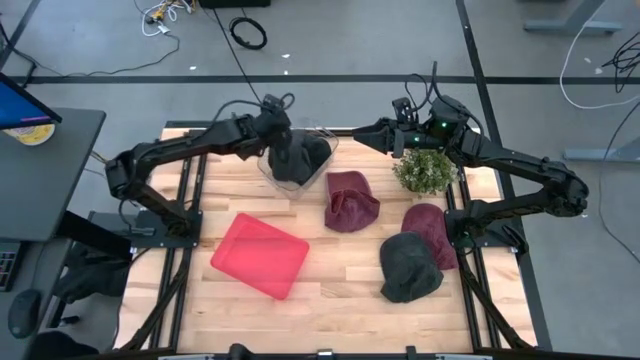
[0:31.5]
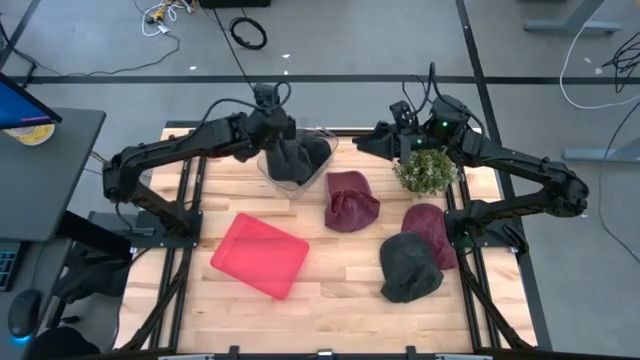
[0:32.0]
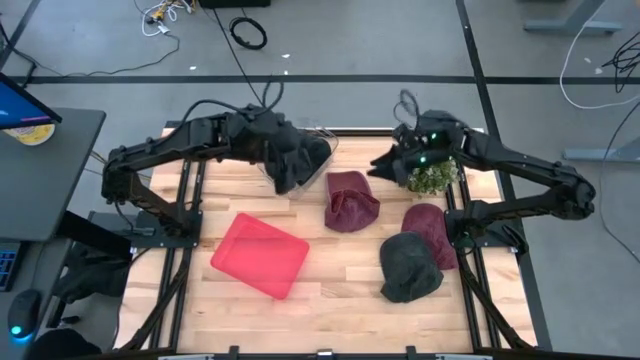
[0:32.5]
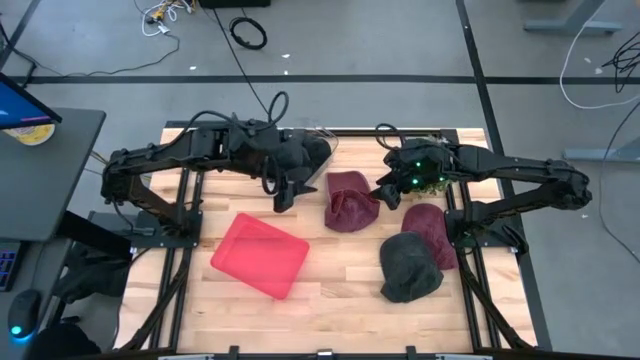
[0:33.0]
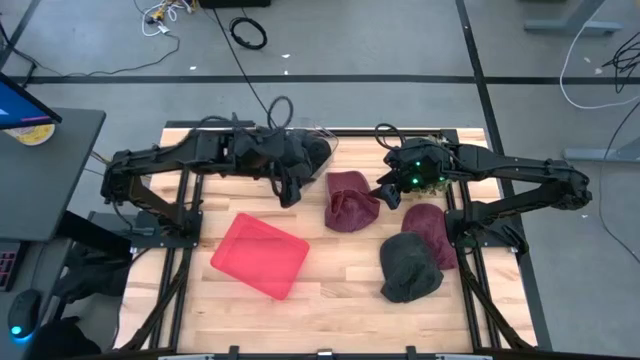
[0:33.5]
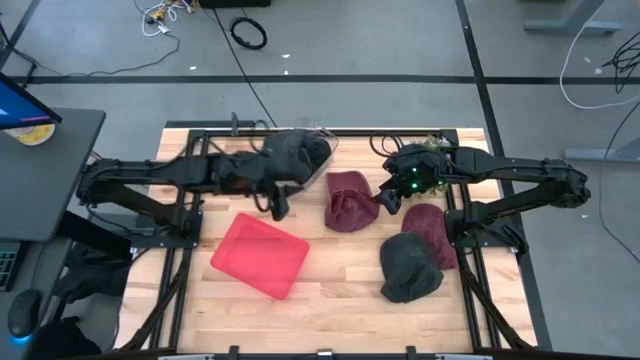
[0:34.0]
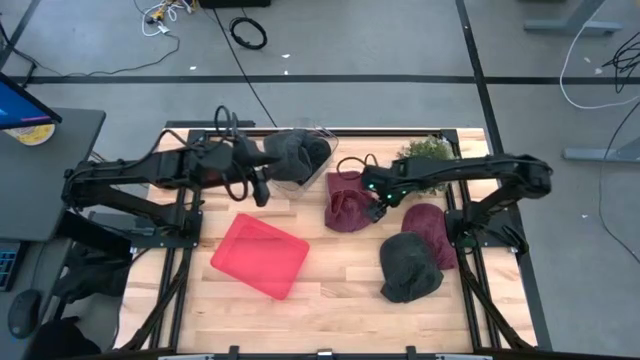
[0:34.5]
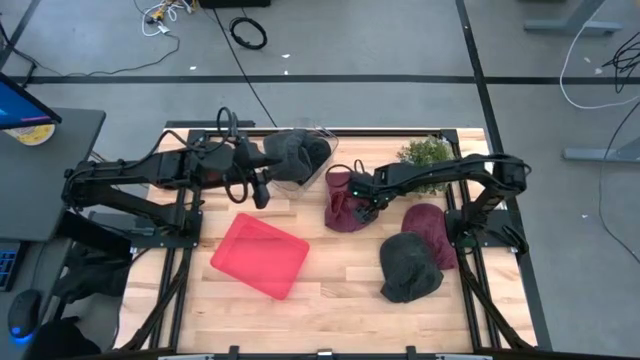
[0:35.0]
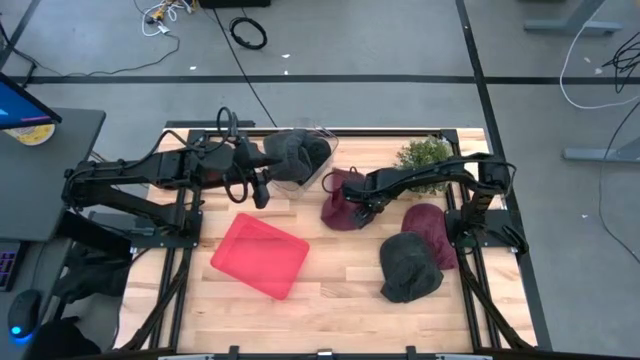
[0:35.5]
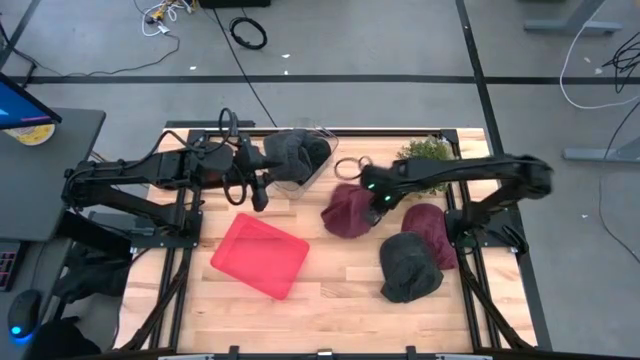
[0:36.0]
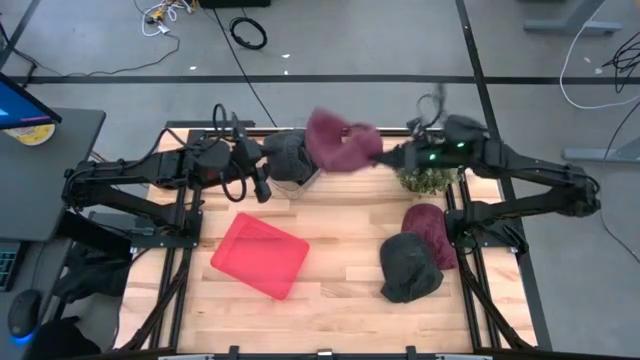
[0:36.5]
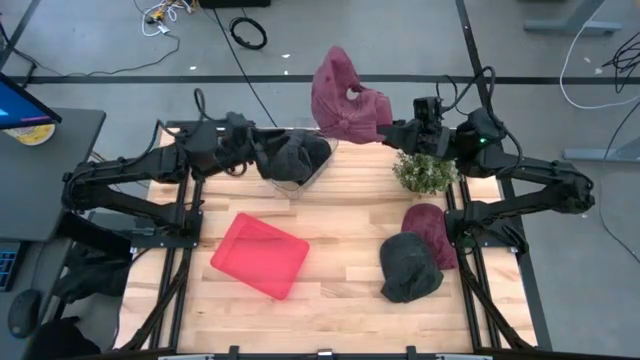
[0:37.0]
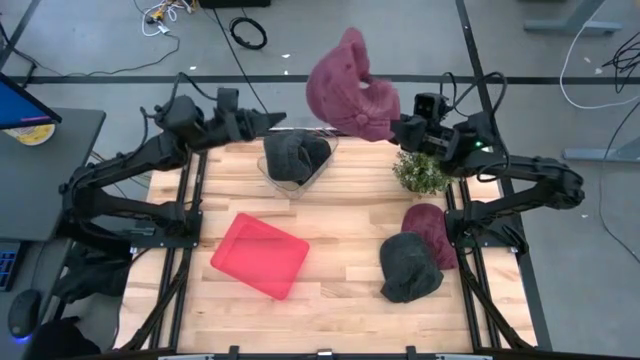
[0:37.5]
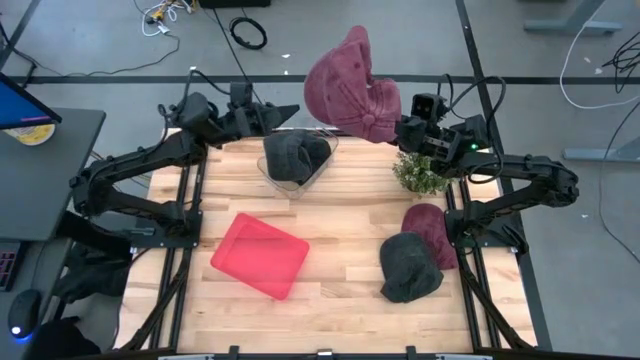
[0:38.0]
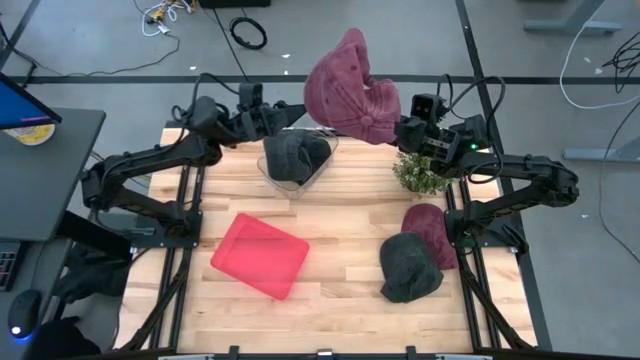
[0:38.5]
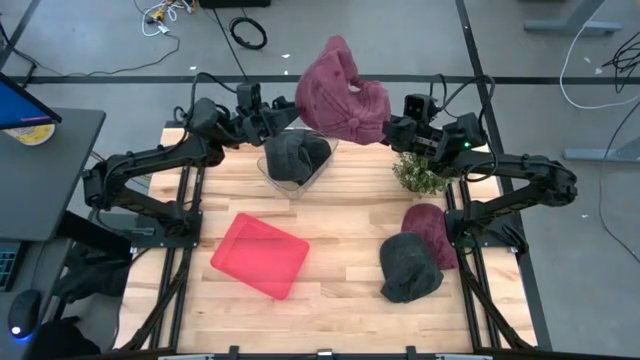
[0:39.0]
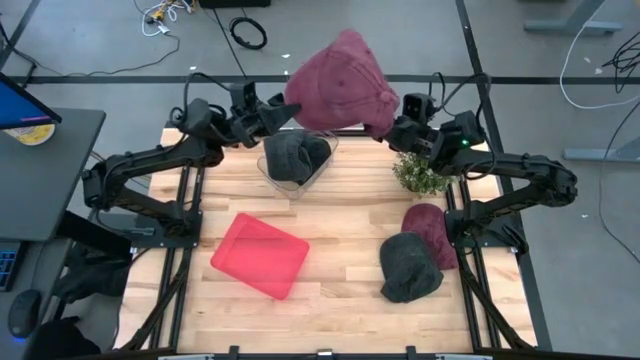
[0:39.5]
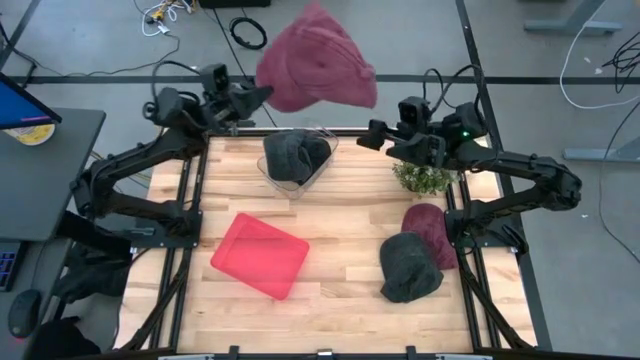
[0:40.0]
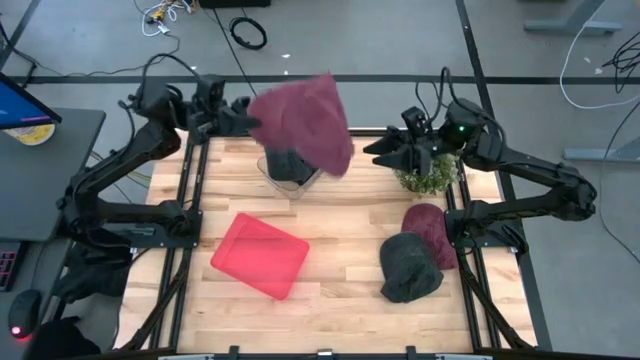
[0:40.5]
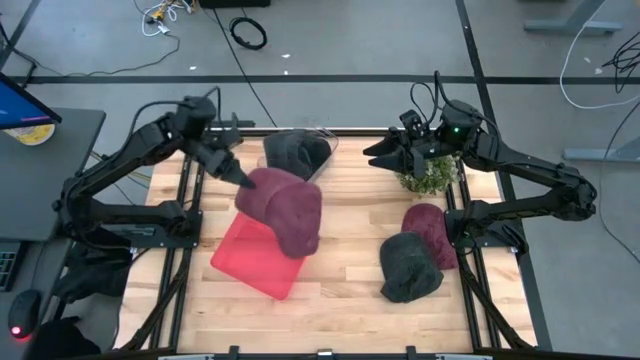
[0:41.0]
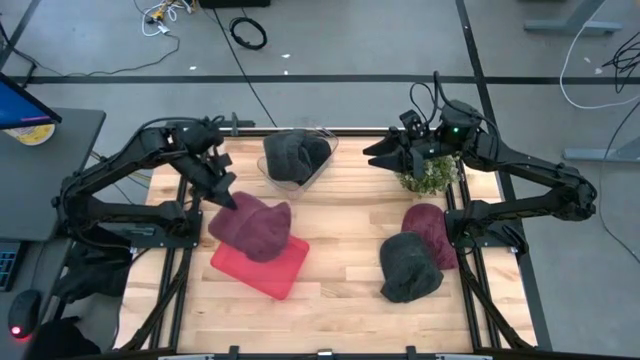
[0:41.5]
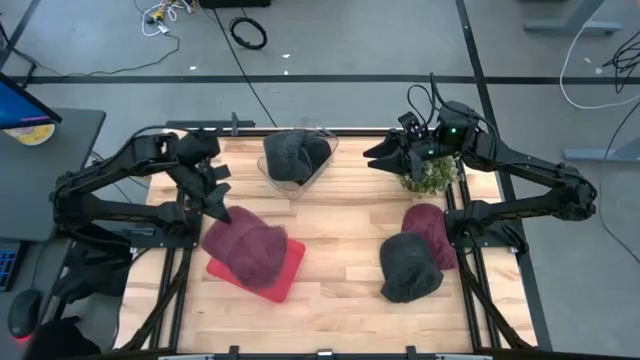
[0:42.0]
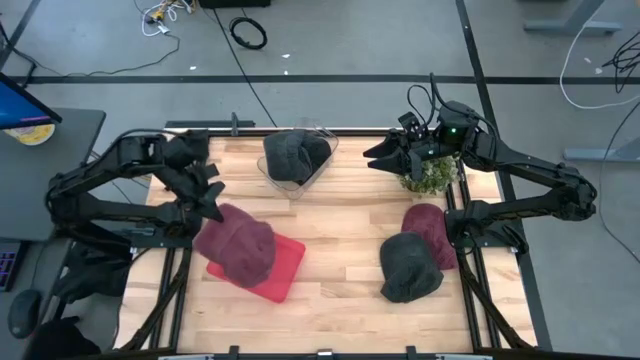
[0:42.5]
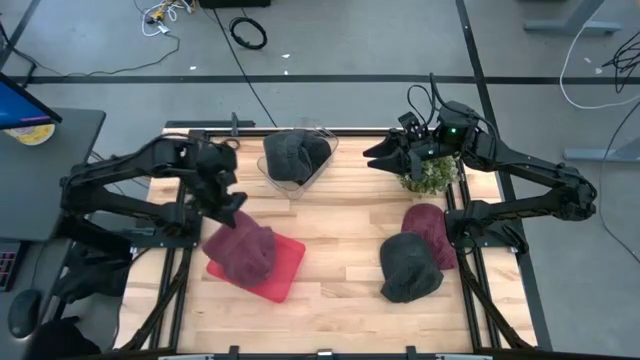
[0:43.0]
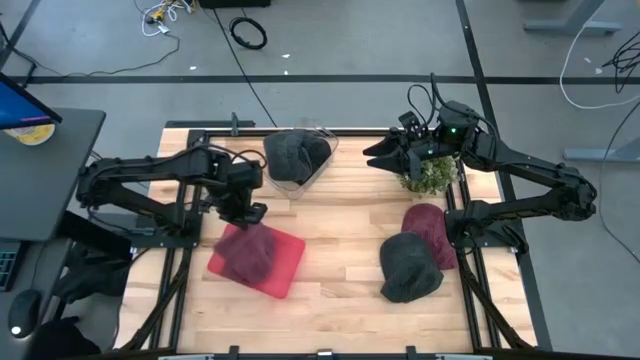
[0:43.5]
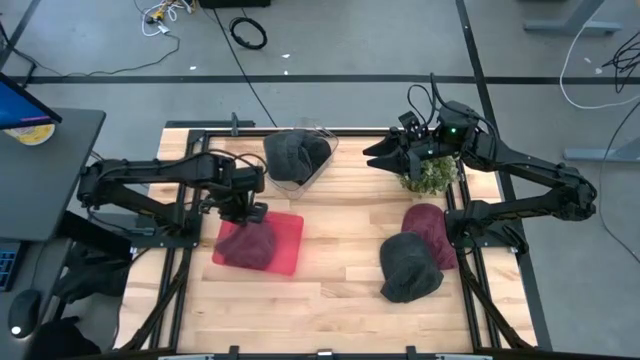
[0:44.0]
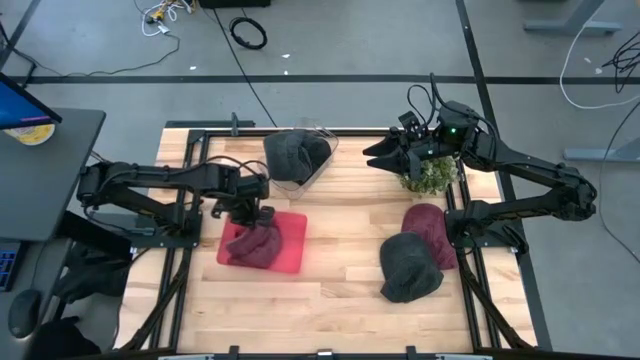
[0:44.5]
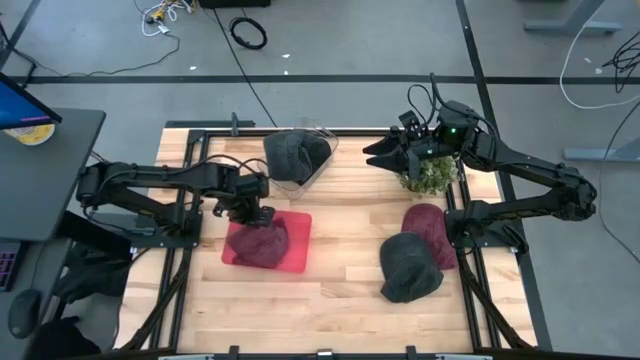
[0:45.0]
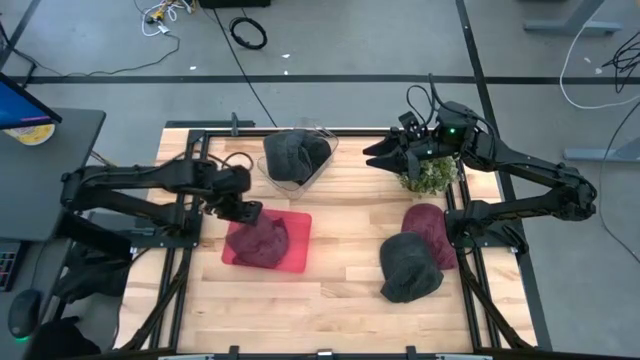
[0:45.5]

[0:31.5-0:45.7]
Task: Pick & Place hat
Put the left red cap into the red bin

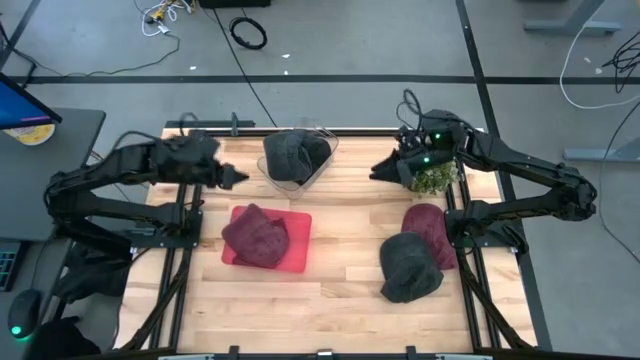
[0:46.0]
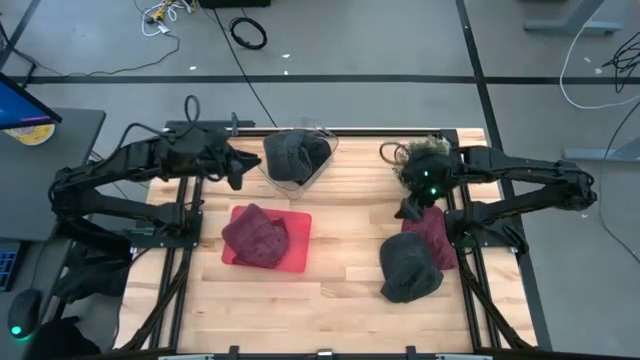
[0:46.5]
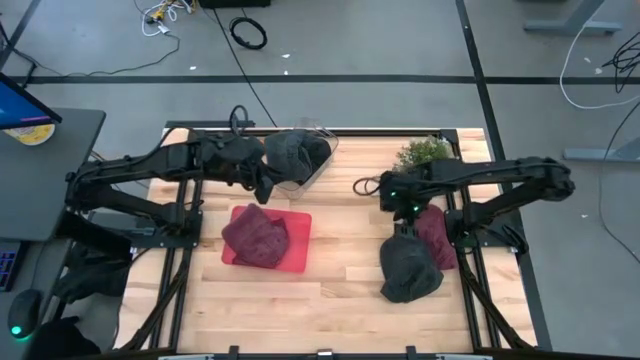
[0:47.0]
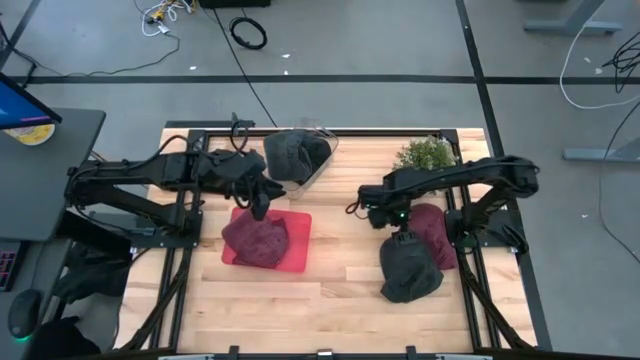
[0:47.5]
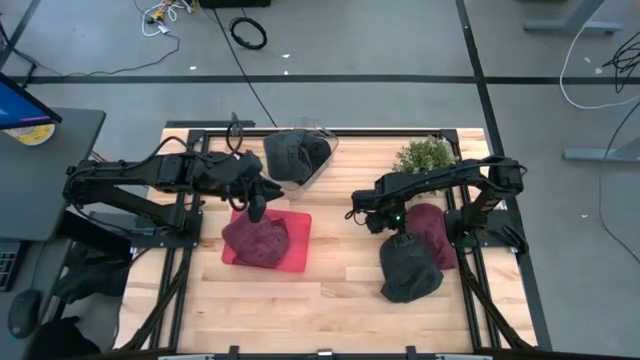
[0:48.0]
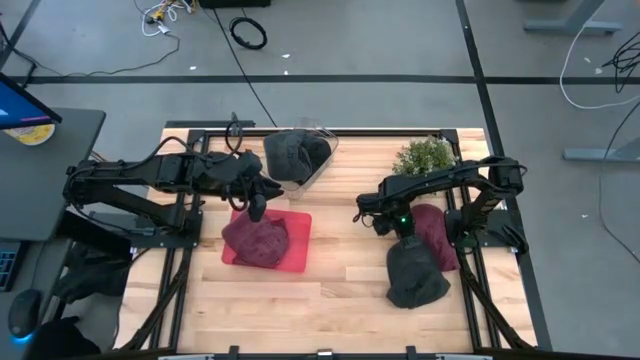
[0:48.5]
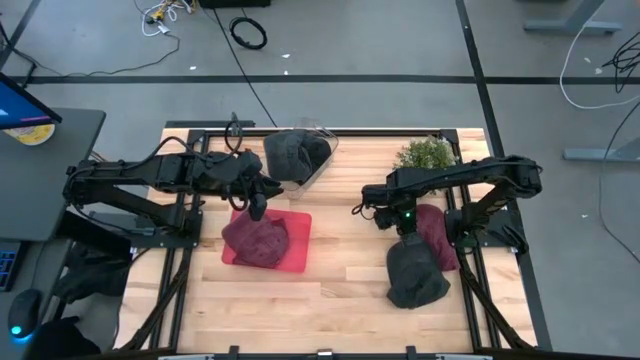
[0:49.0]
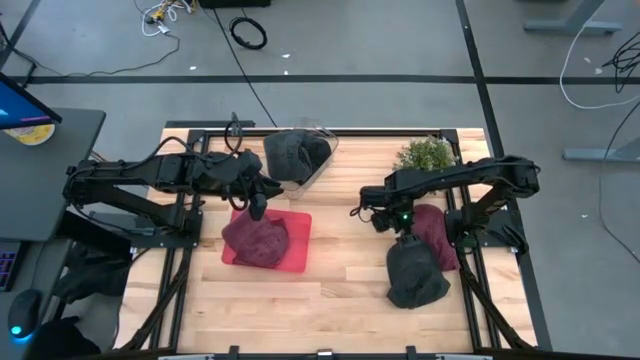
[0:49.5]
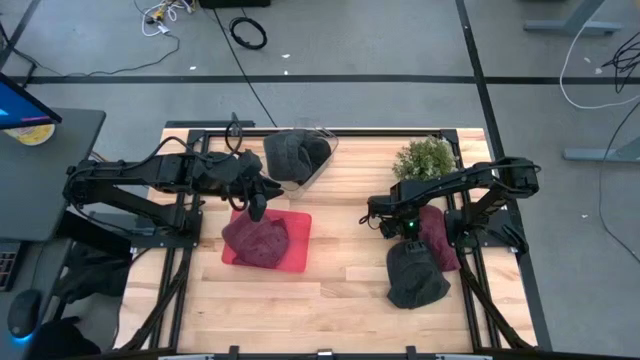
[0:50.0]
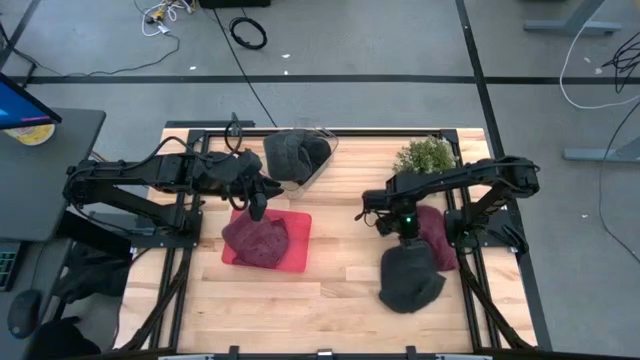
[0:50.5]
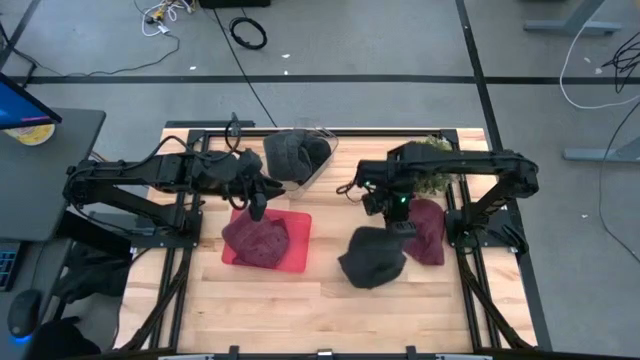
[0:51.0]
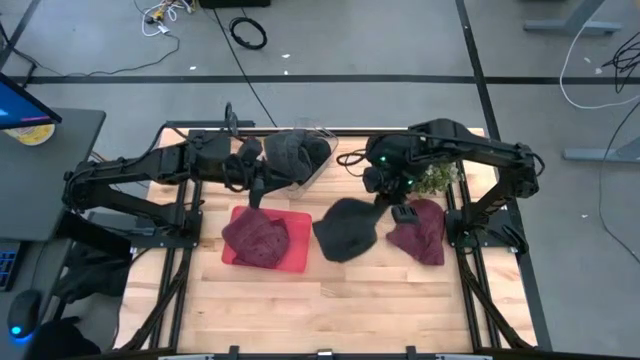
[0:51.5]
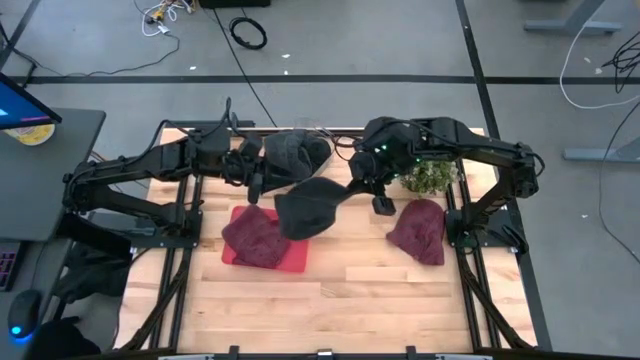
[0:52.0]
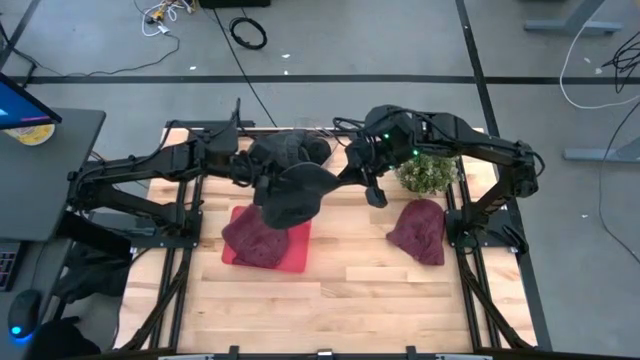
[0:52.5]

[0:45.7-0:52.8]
Put the black cap into the transparent bin
